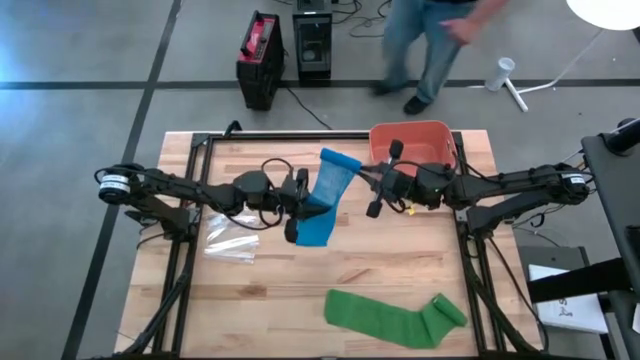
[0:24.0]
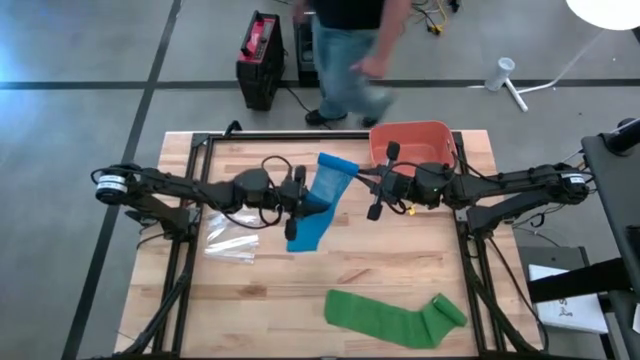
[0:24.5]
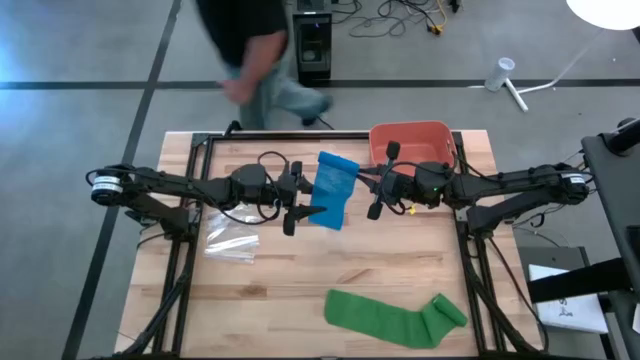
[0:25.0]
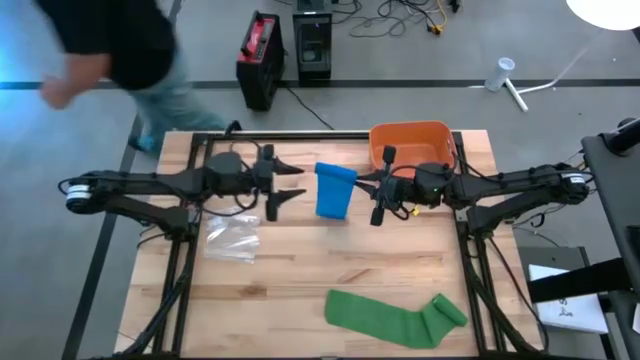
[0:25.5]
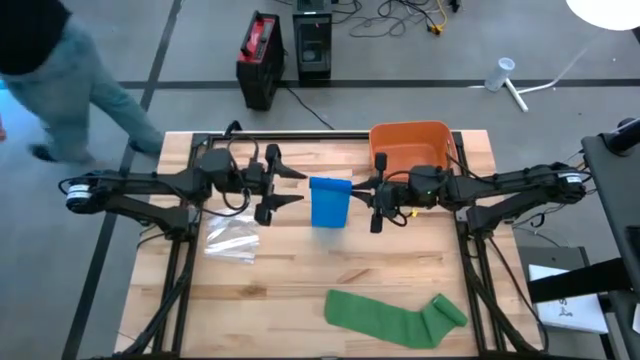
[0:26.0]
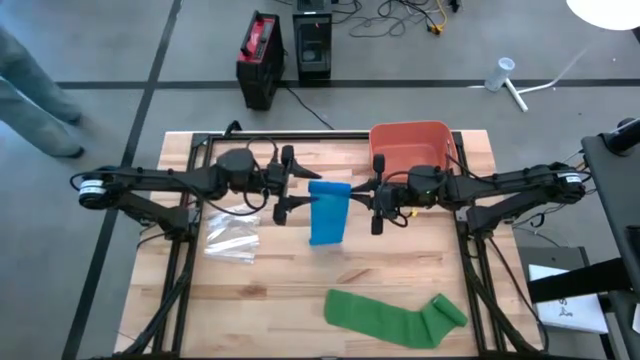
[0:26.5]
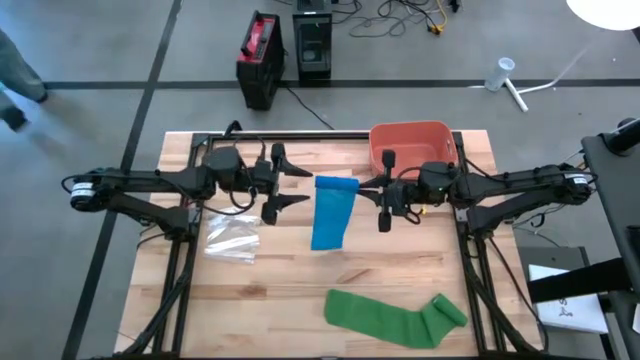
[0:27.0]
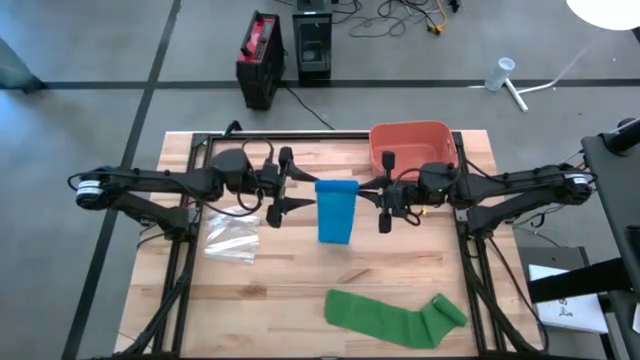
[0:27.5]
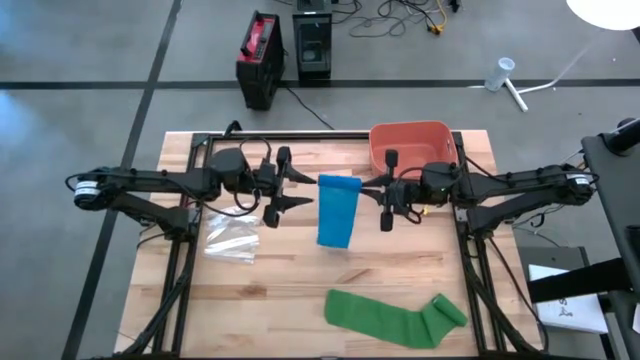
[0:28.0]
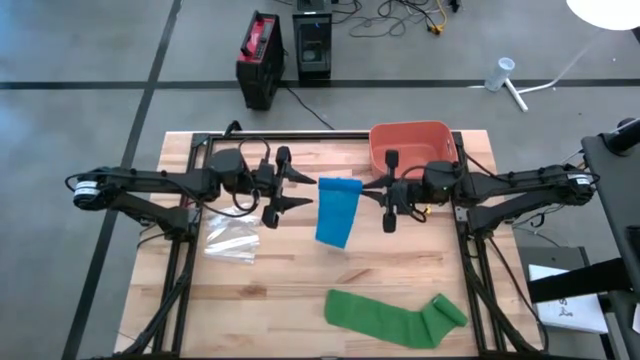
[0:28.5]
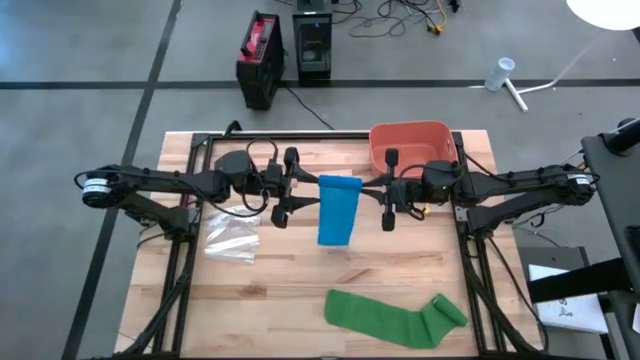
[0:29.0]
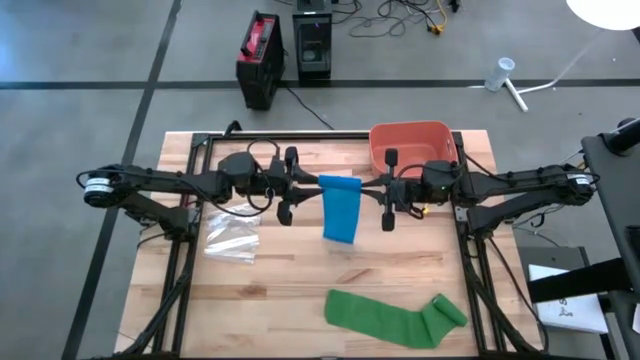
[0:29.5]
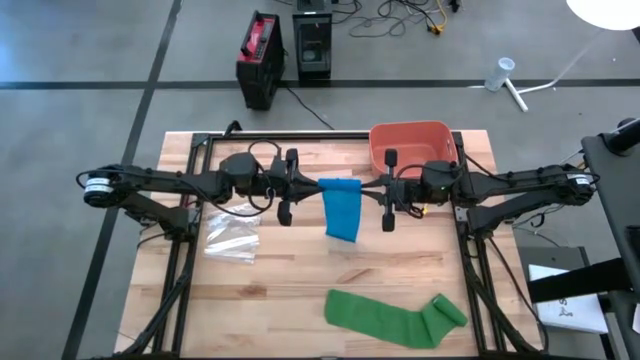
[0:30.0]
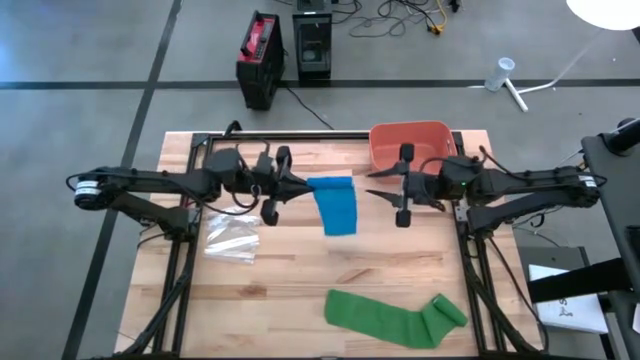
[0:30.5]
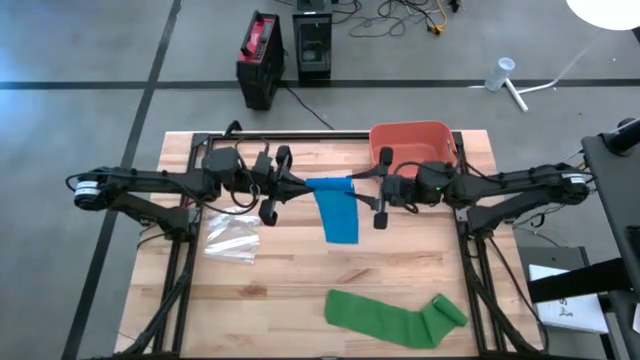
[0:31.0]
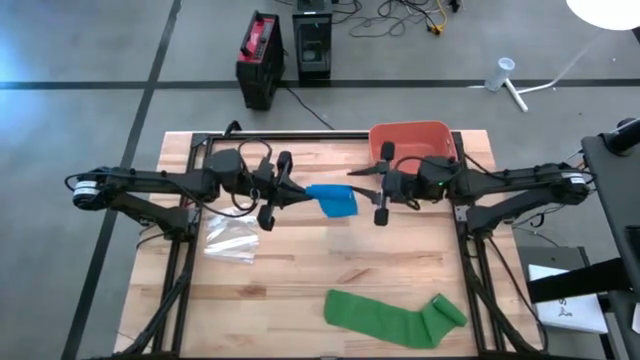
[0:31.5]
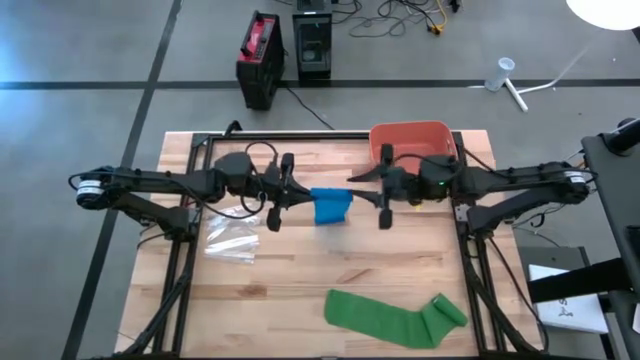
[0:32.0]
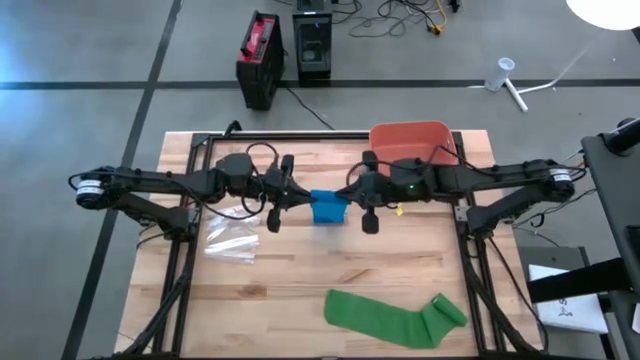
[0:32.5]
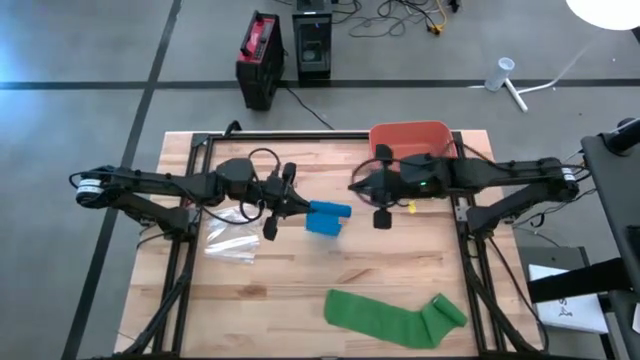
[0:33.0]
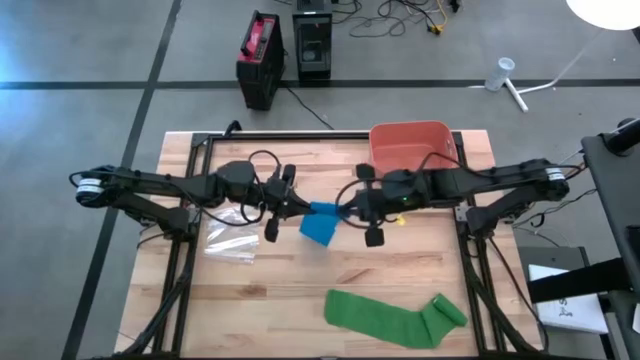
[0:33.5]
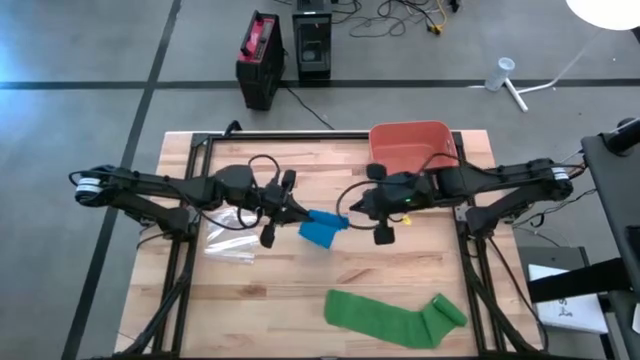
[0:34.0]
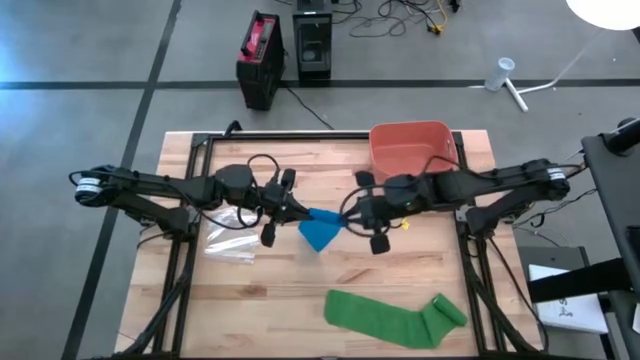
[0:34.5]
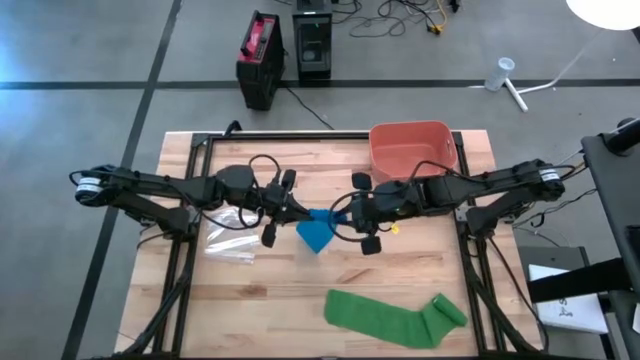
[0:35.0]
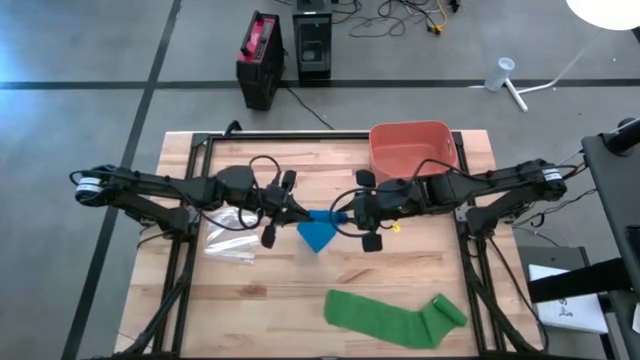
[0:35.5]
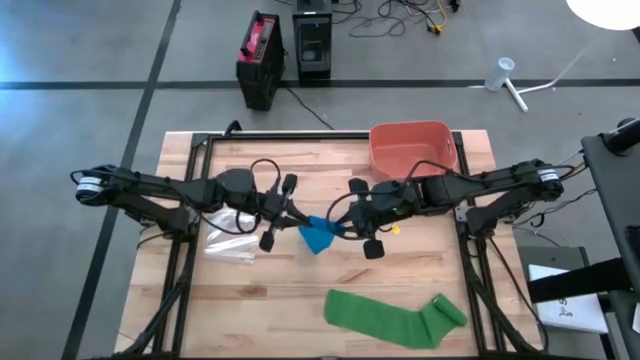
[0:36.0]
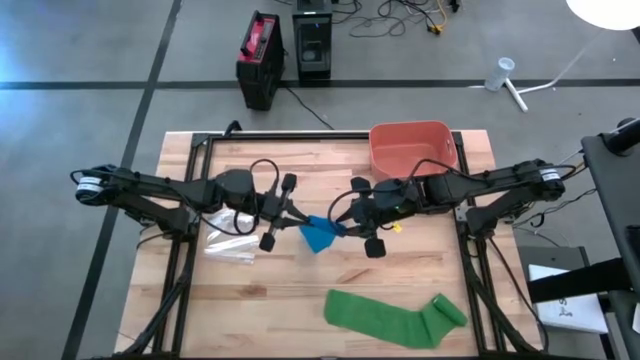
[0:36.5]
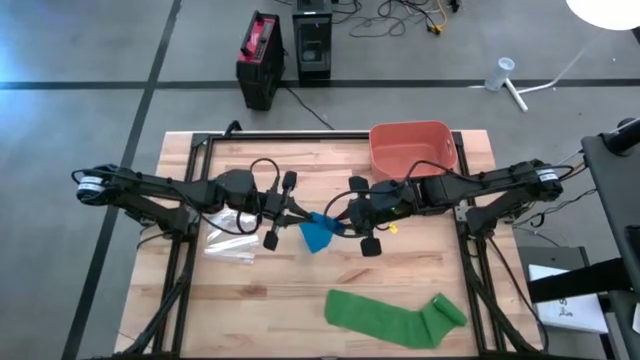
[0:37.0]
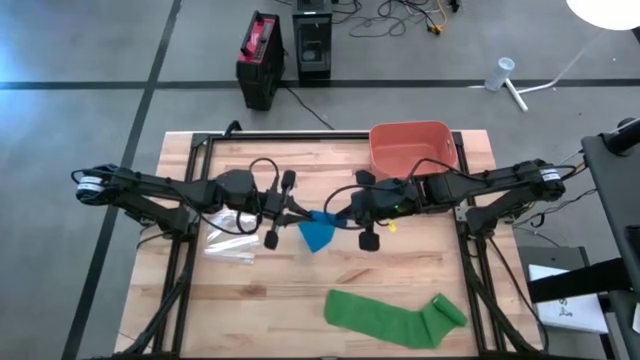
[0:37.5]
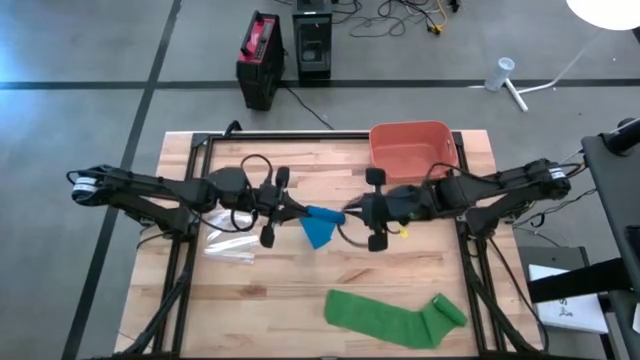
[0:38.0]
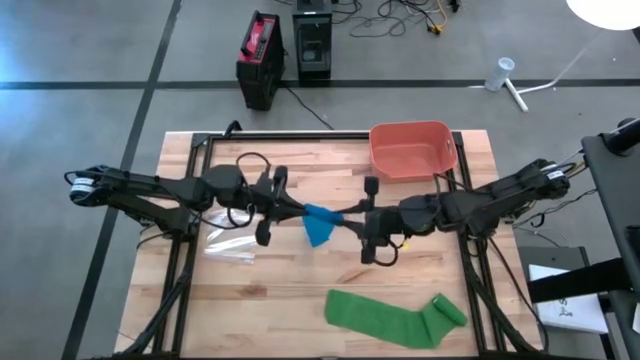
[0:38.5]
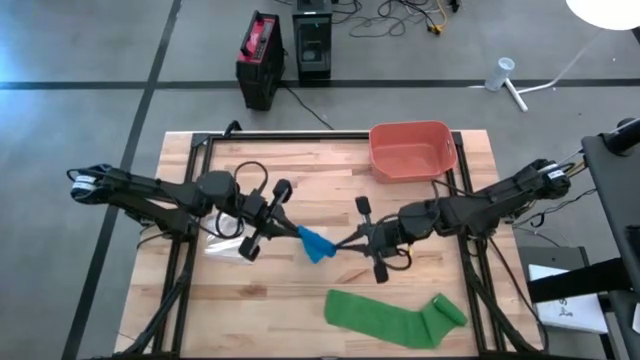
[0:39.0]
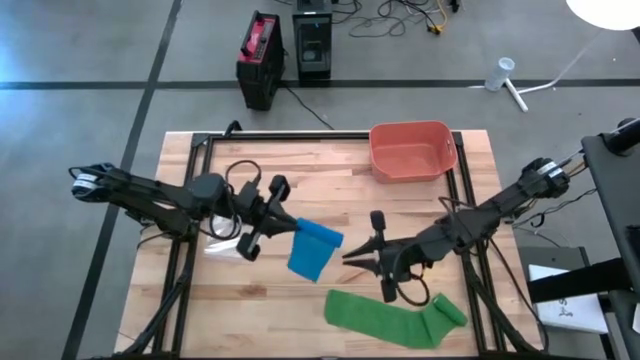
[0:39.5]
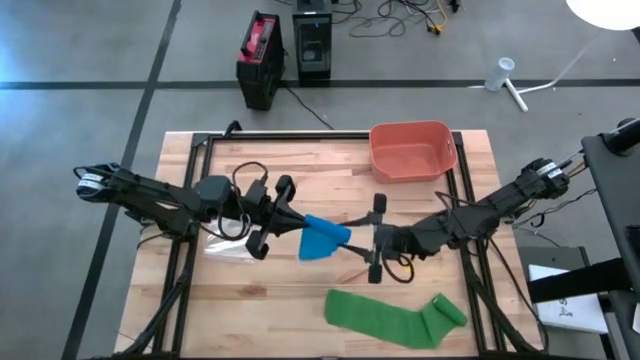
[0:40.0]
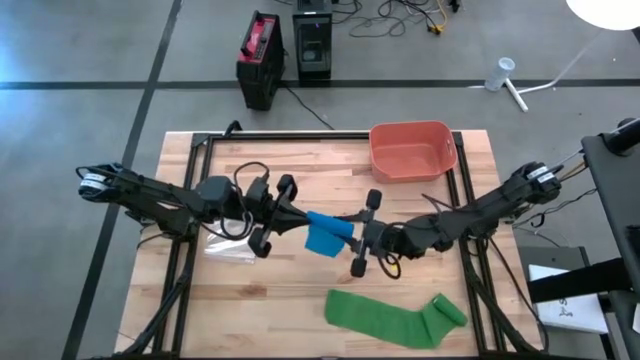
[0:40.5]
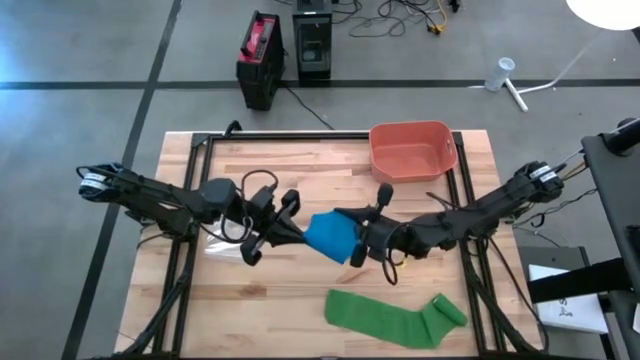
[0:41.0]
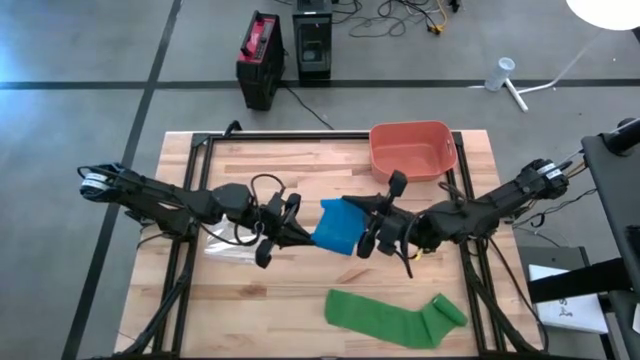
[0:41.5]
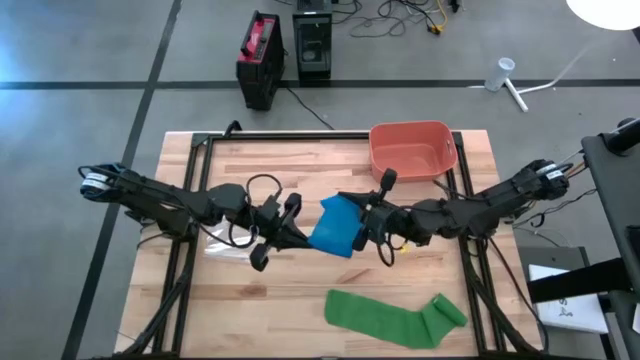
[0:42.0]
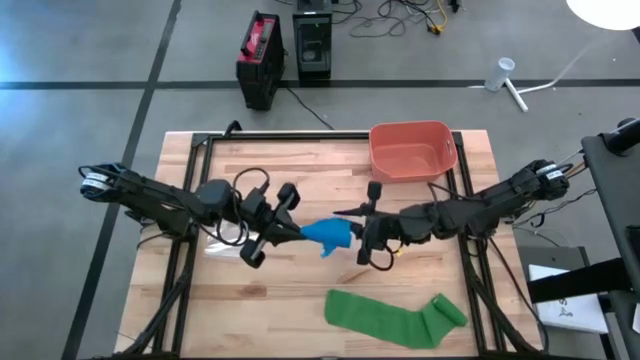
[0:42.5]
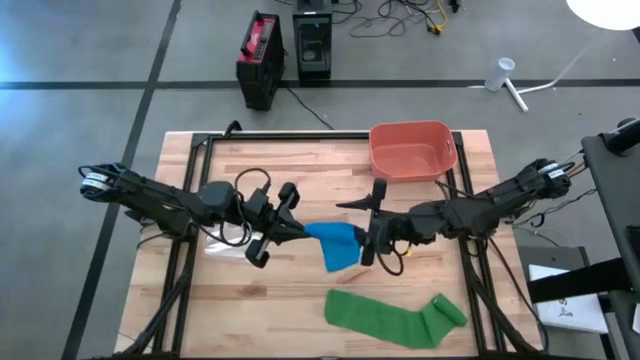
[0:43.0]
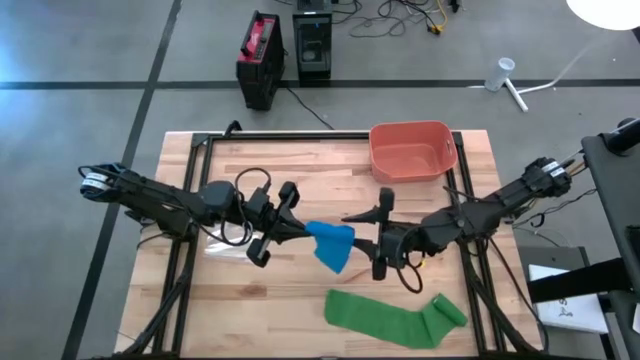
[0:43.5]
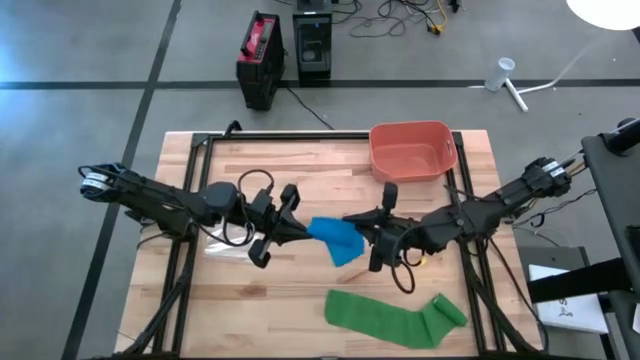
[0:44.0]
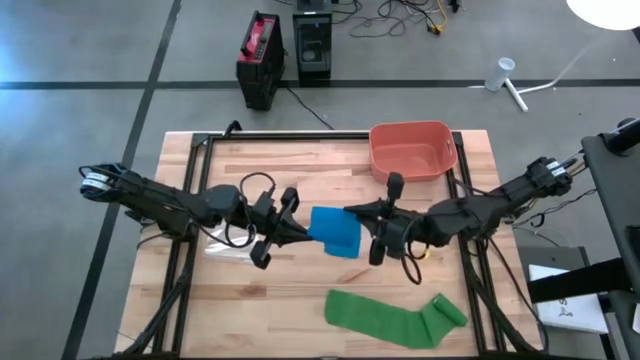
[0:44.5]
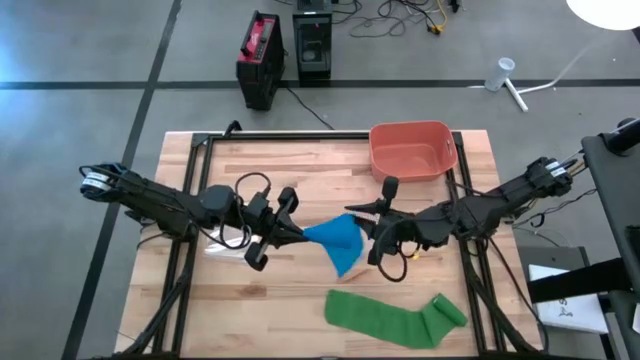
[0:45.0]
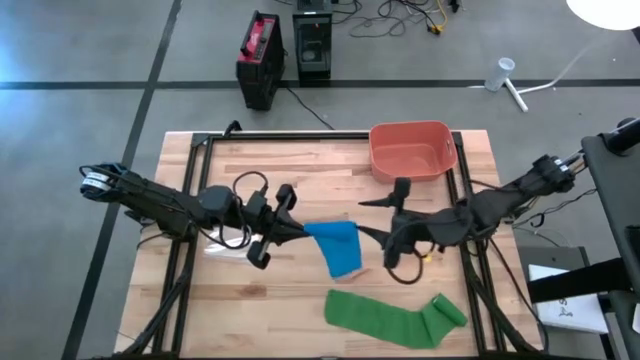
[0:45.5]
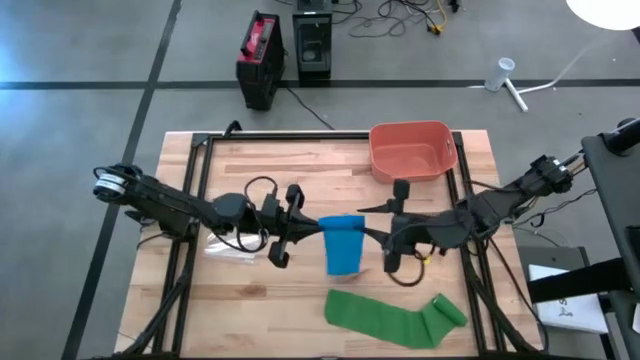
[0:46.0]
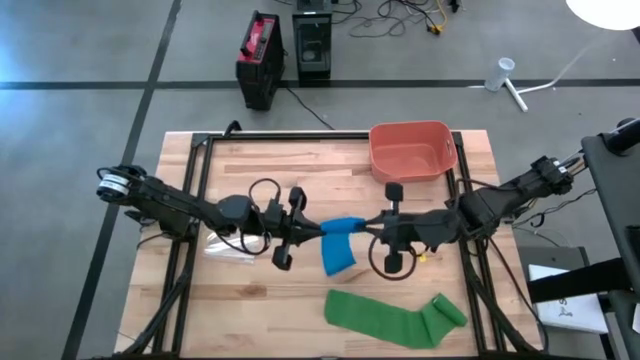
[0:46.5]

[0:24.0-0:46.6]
Task: Roll bandage
Roll the blue bandage
